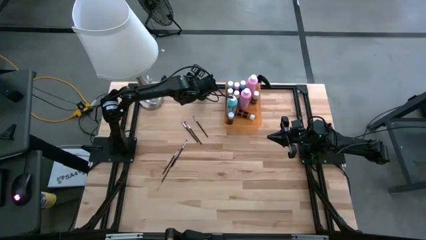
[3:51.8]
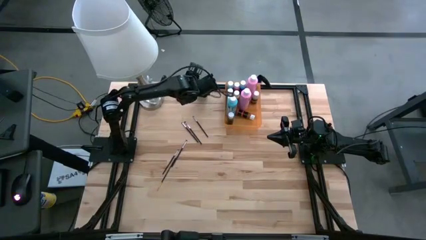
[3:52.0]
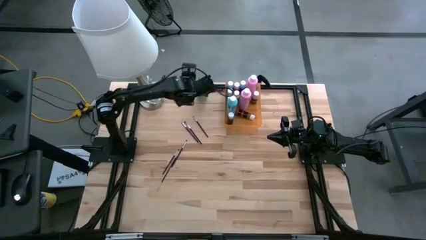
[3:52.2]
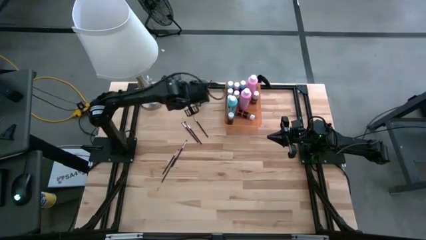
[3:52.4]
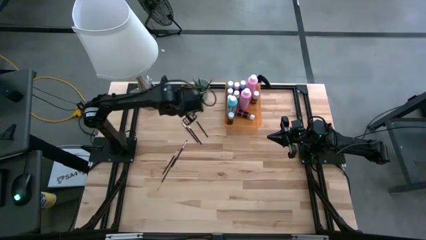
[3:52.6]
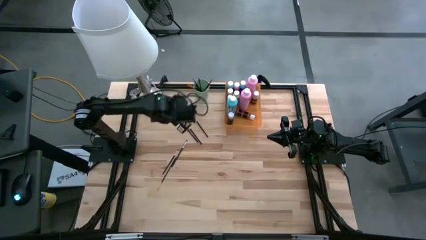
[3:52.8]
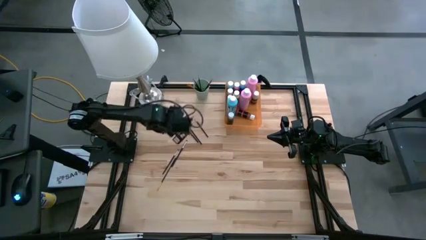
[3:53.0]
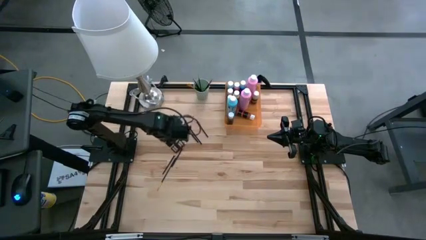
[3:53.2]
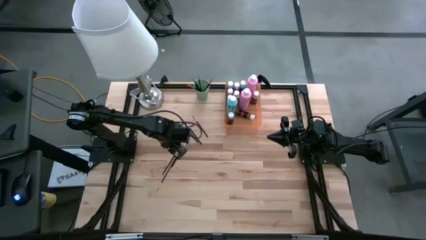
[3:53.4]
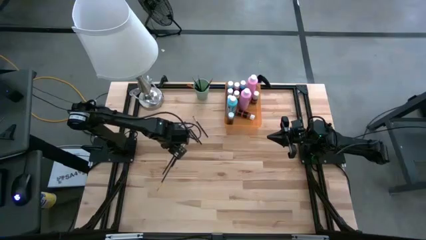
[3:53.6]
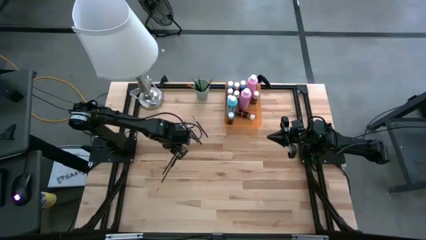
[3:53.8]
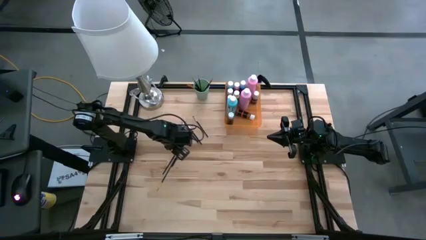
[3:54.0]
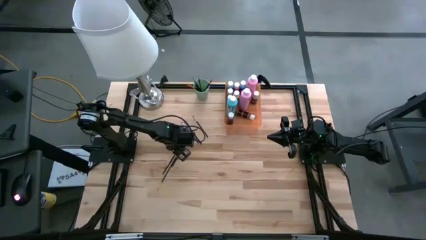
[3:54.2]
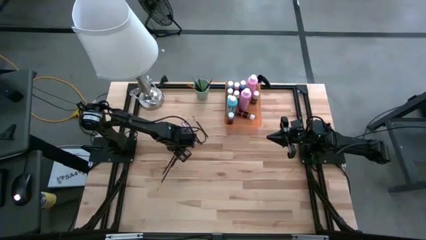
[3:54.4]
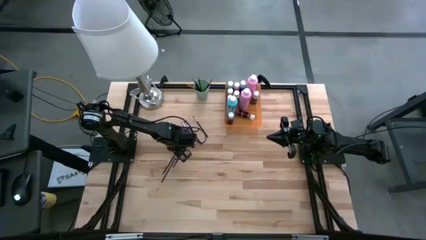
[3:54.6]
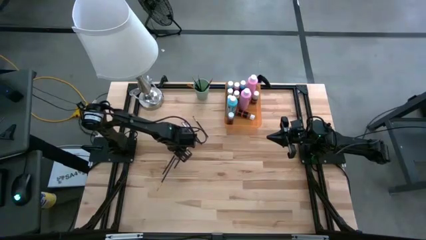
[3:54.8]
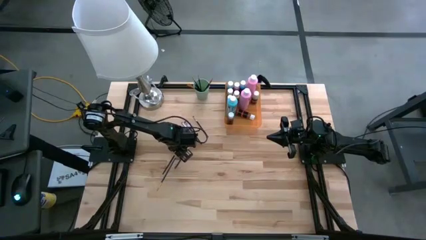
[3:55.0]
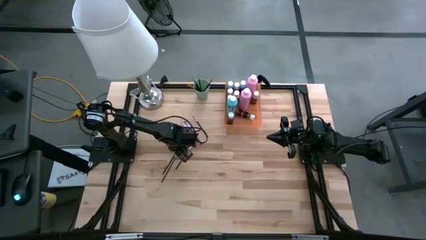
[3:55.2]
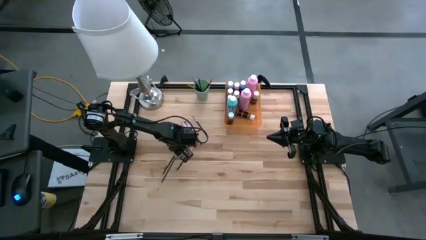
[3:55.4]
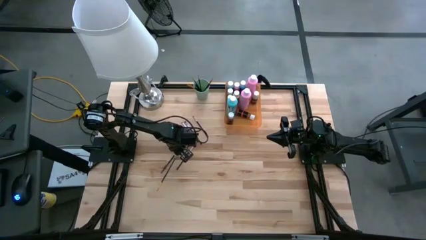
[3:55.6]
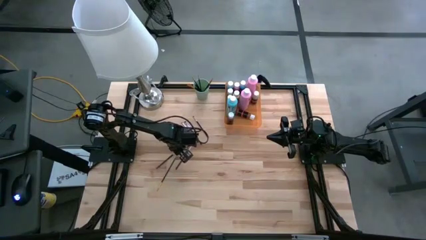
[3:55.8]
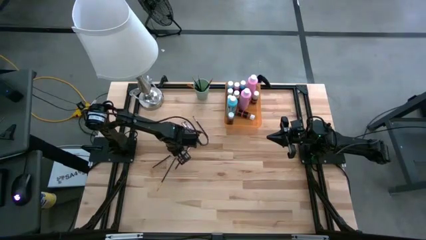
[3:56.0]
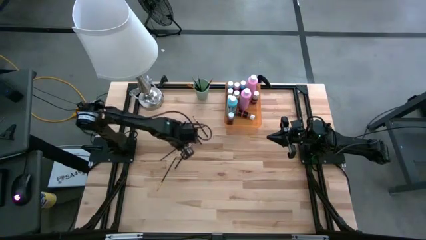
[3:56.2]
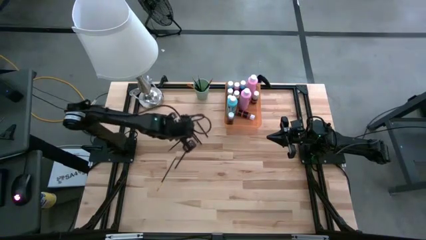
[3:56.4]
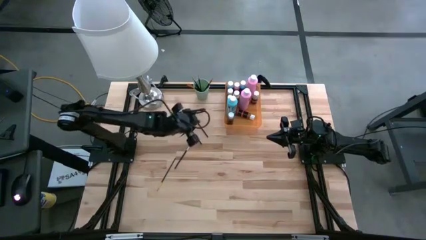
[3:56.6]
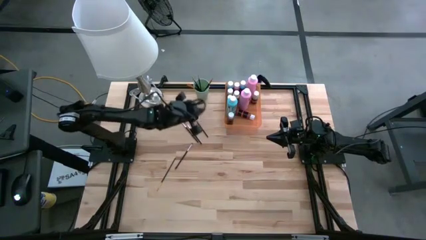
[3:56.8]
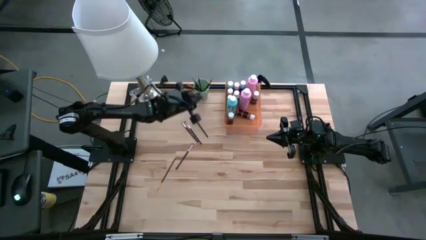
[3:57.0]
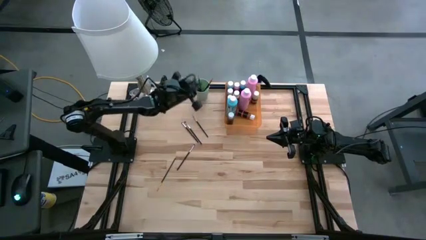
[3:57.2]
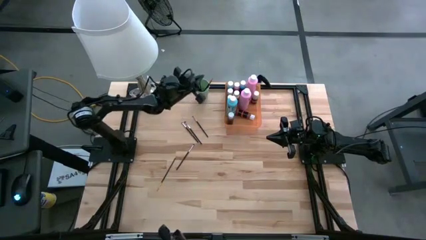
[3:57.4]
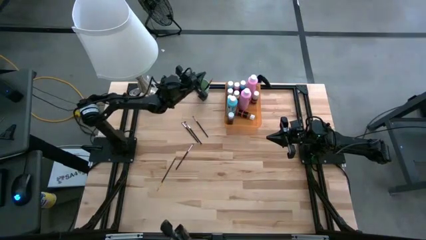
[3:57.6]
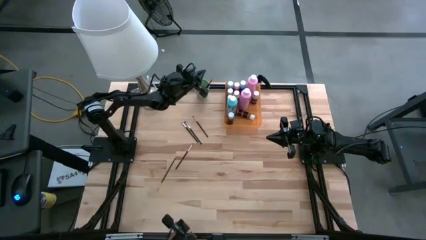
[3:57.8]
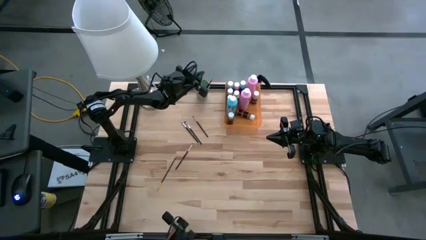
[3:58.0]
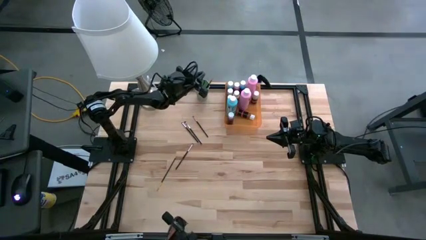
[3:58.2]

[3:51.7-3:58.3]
Task: Pick & Place Paint Supplies
Put the black paint brush into the green cup

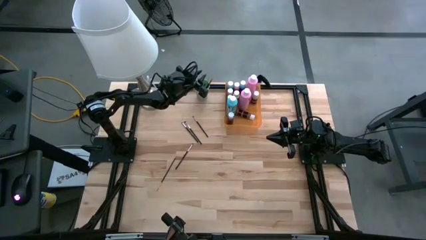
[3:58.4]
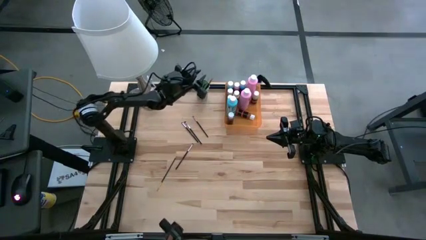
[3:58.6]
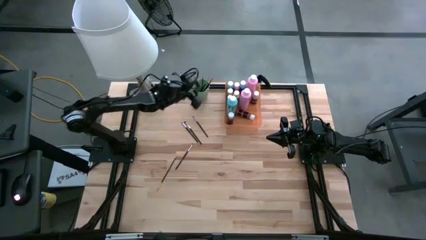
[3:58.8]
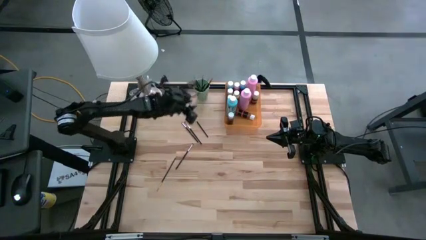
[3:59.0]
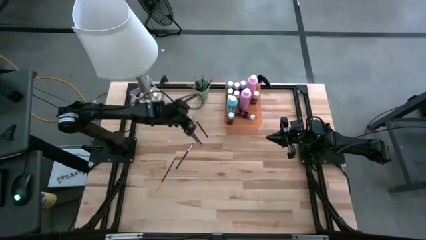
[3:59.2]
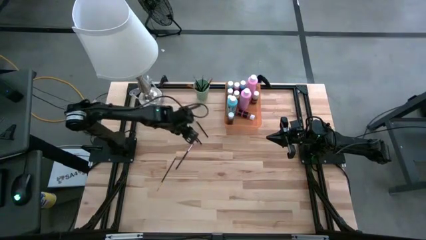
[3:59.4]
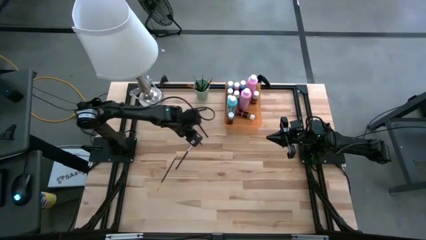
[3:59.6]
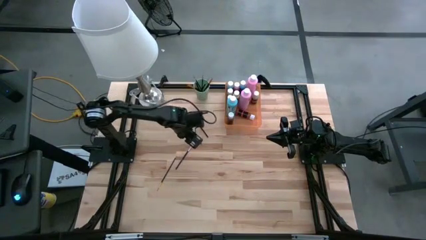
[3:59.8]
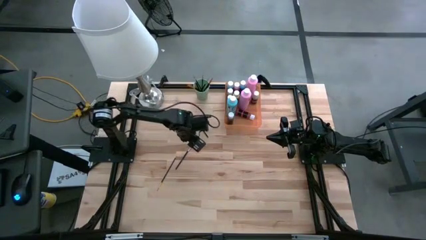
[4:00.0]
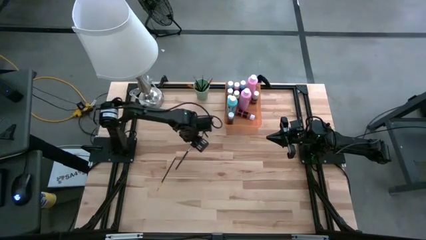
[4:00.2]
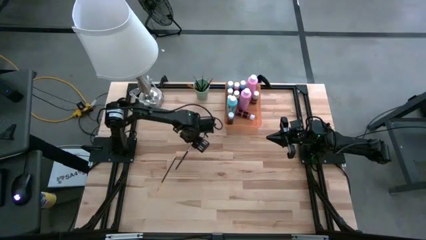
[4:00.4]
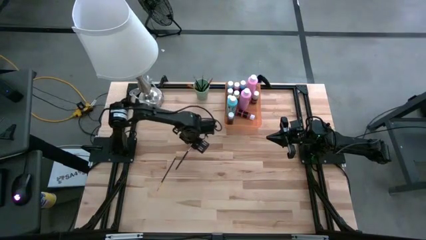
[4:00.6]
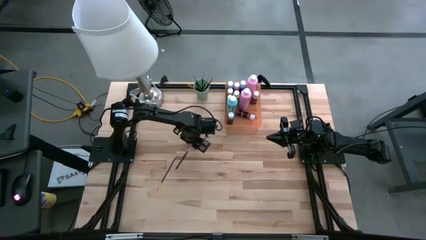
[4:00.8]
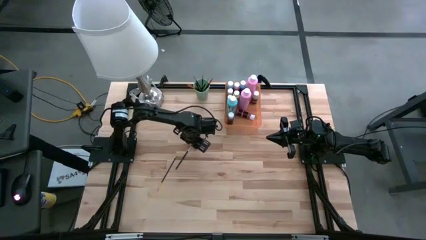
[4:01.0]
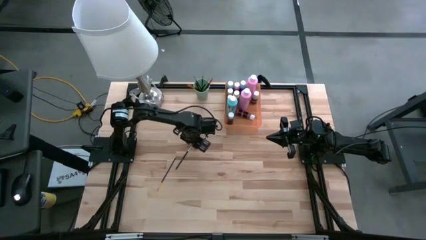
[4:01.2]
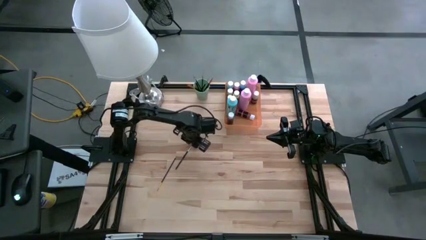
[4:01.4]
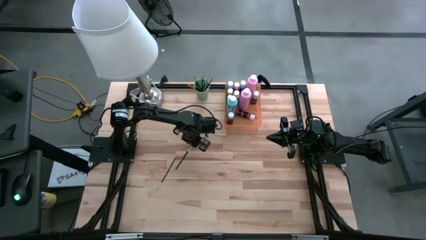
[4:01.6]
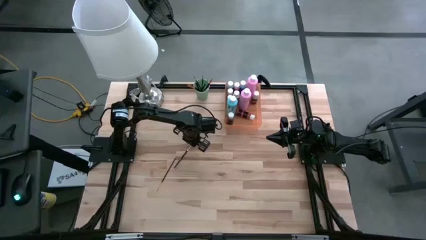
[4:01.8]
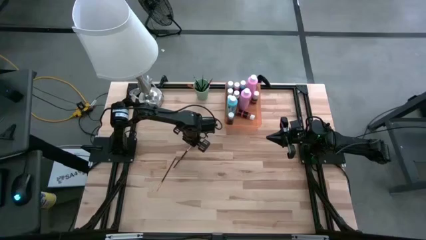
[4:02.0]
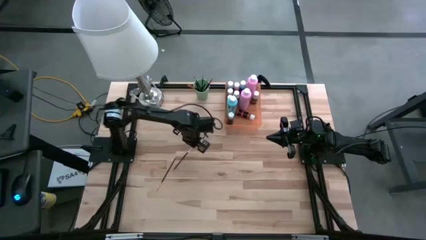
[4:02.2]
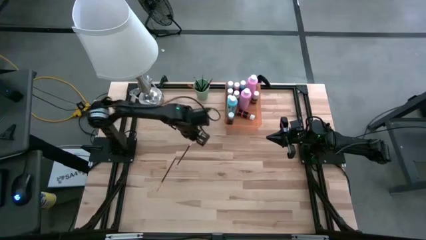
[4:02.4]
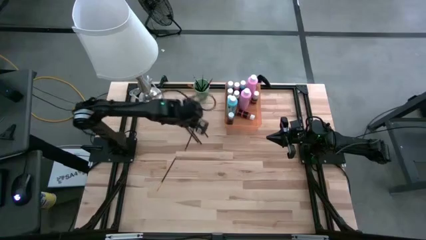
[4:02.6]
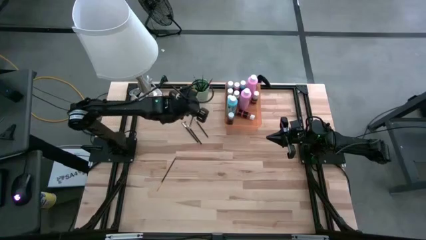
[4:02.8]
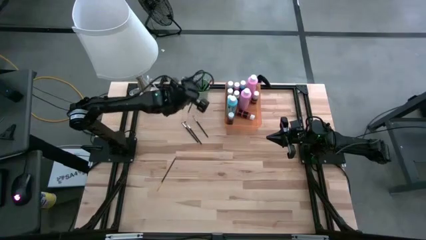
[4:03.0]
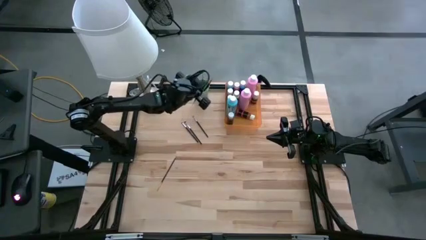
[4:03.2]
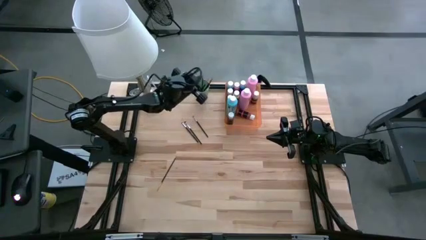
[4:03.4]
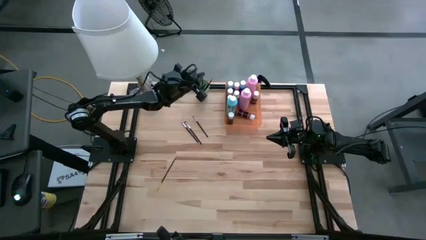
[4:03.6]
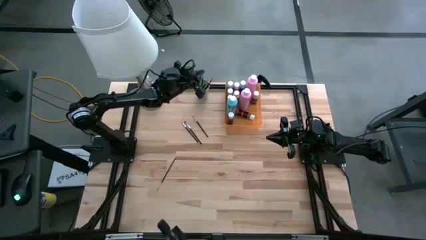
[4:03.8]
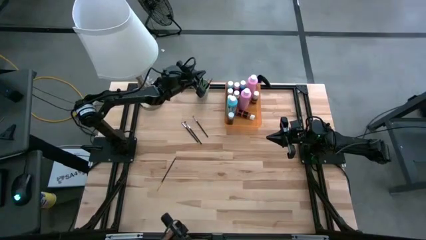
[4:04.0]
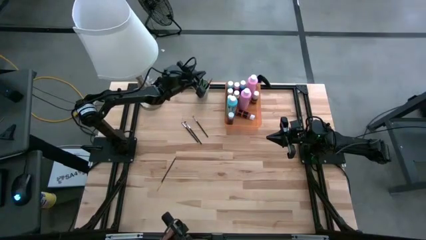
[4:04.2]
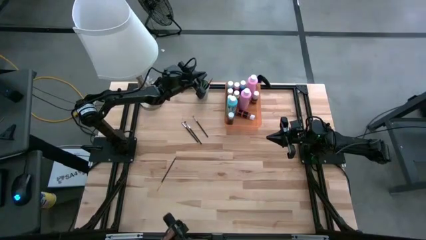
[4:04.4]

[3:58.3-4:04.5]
Put the black paint brush into the green cup
